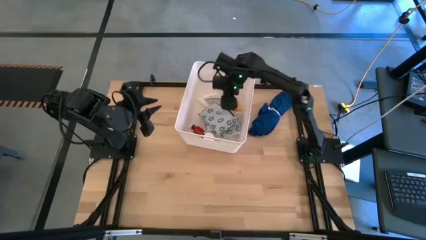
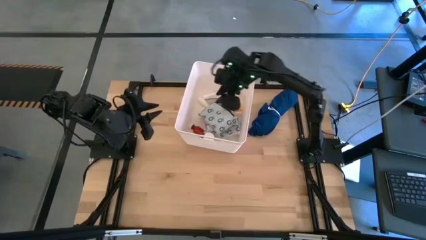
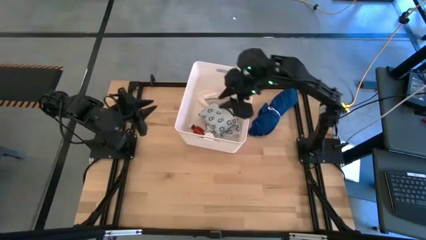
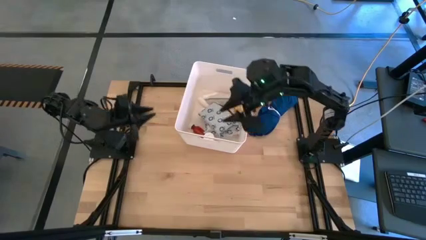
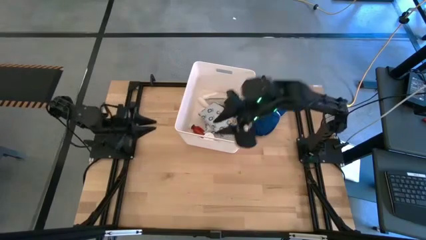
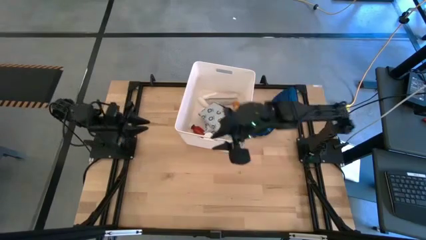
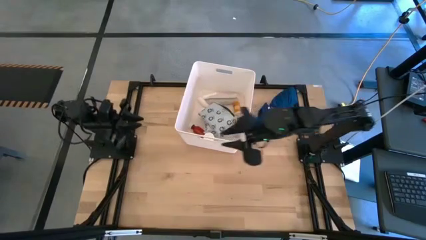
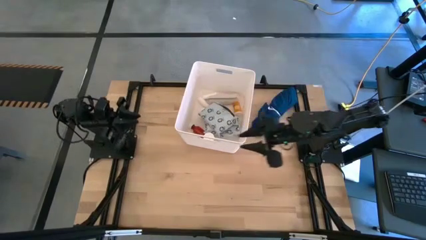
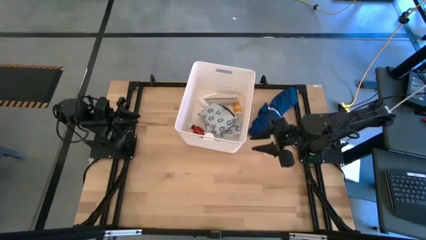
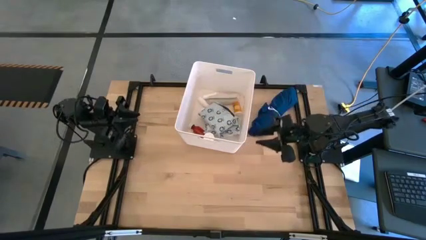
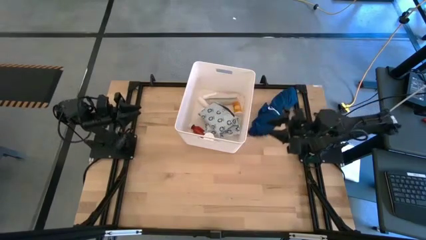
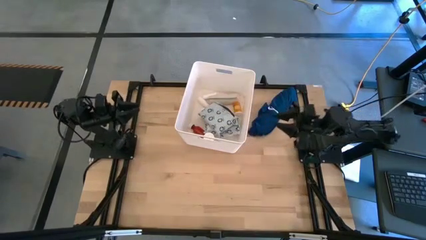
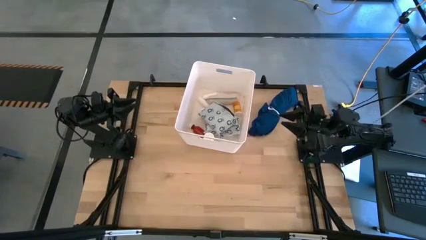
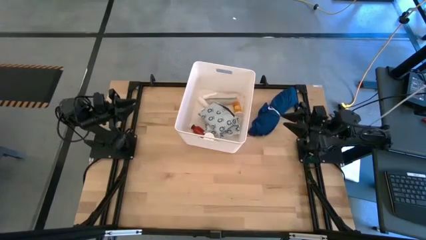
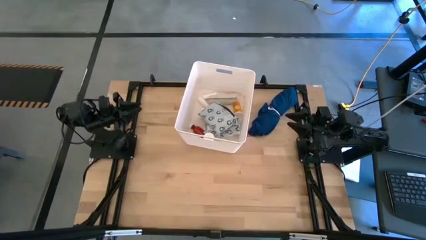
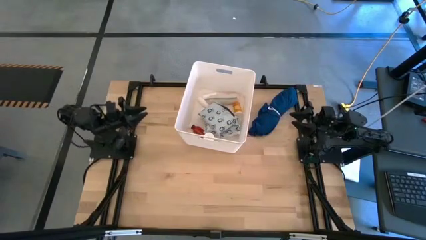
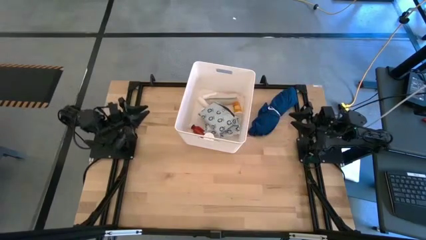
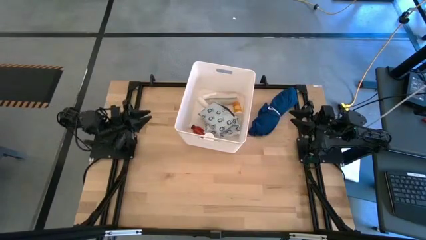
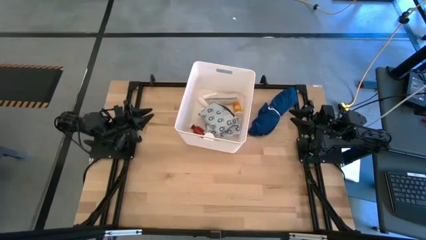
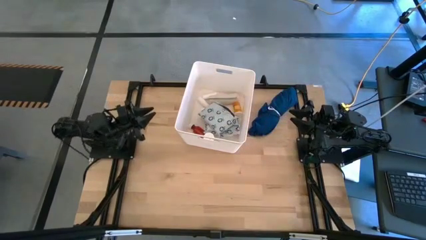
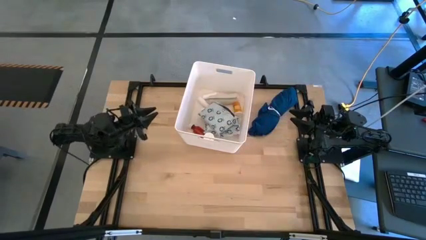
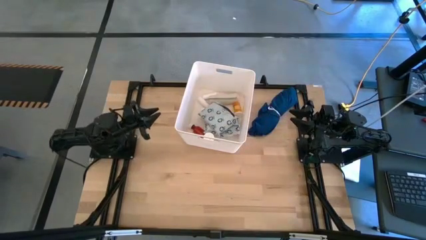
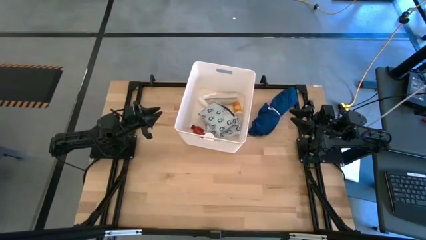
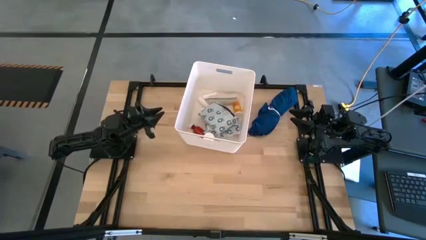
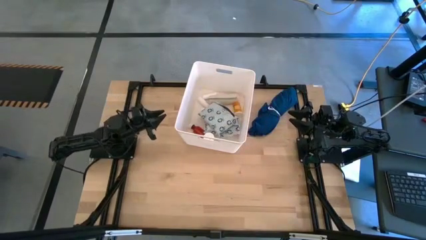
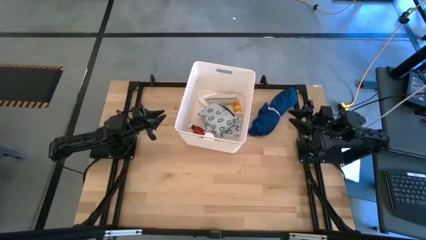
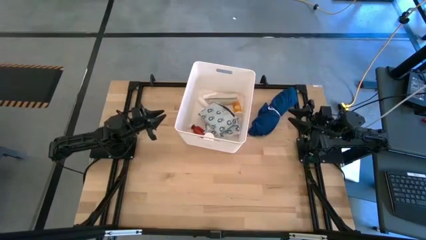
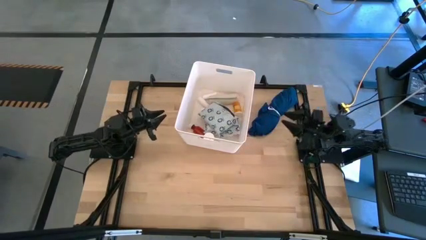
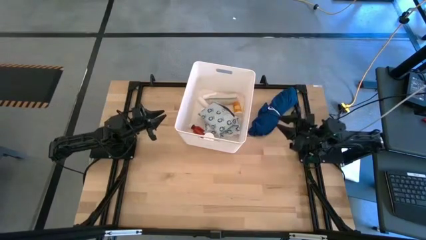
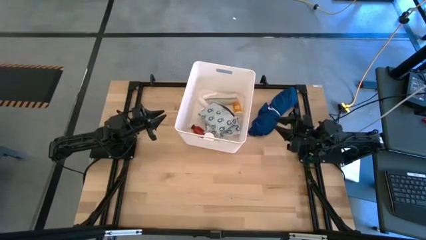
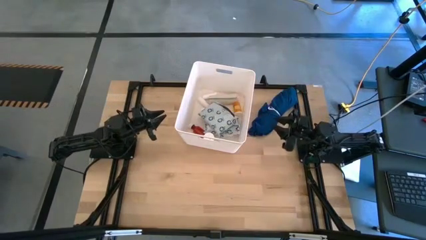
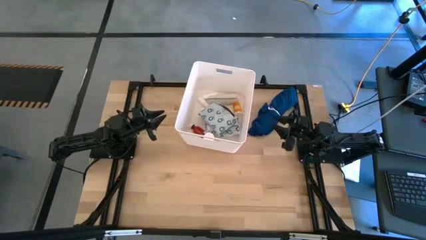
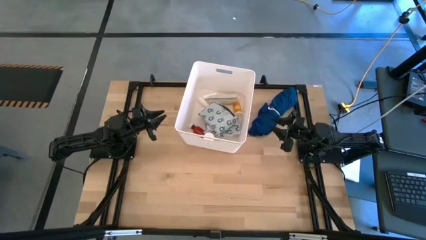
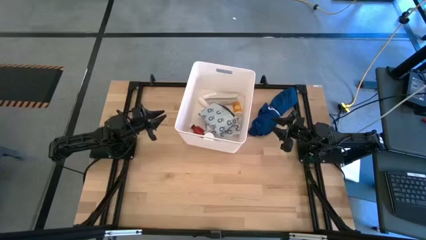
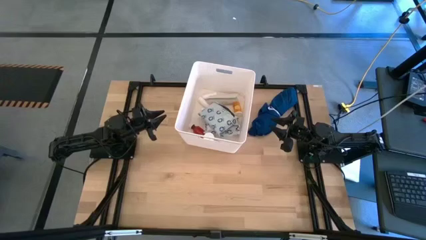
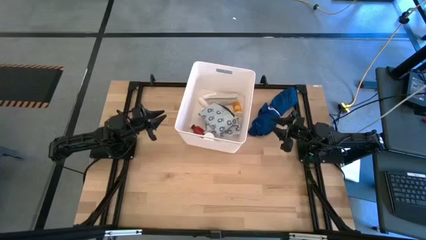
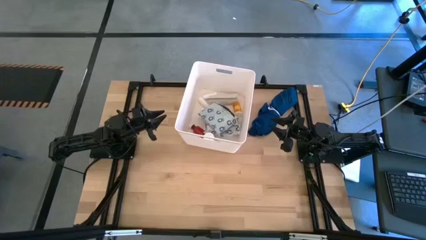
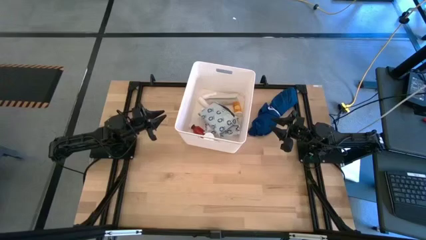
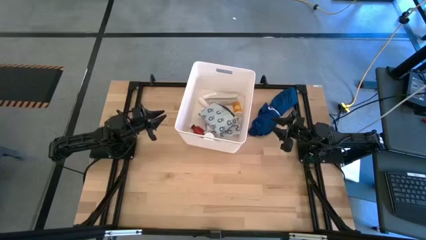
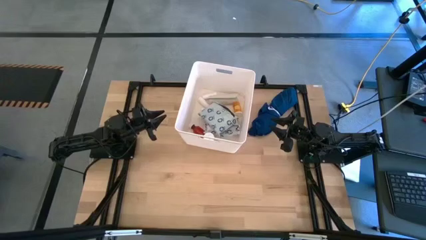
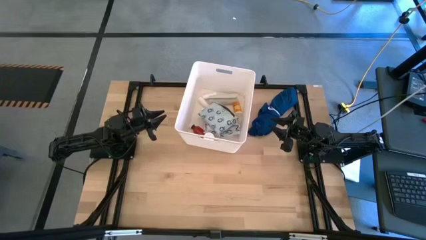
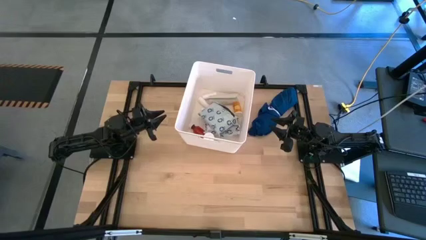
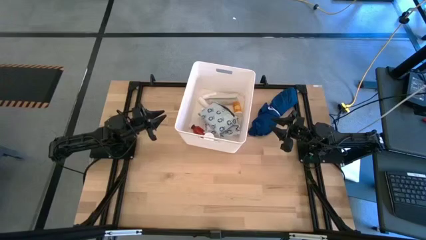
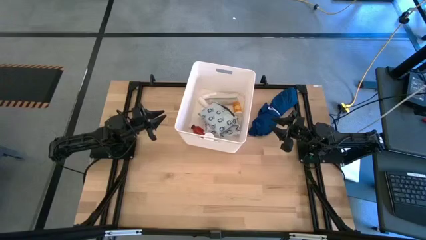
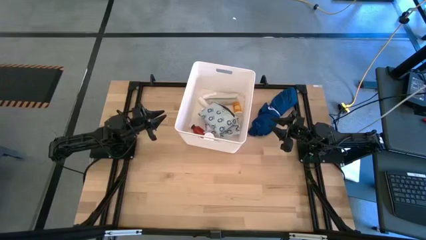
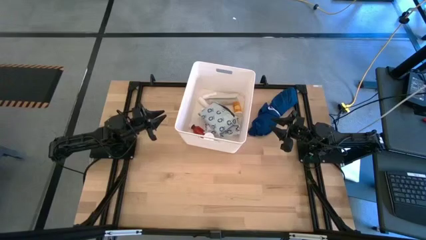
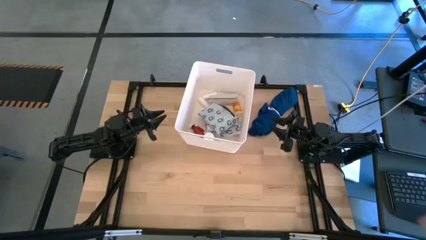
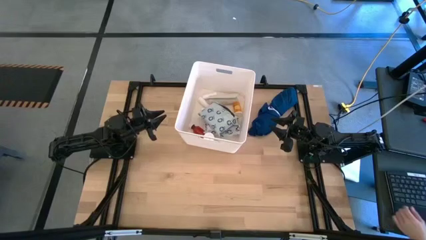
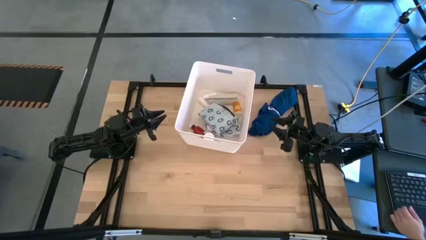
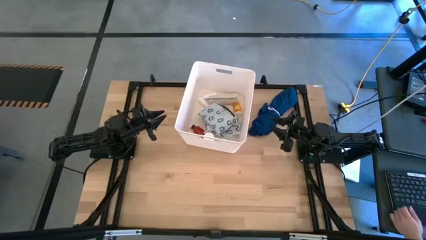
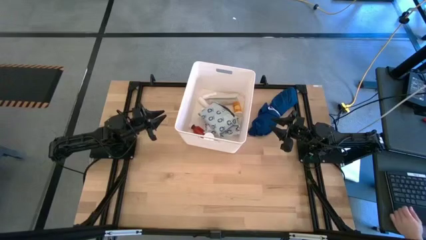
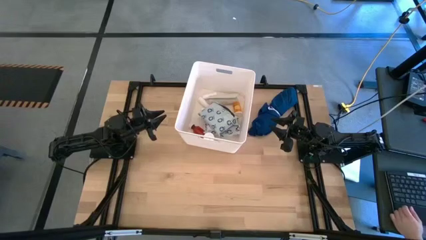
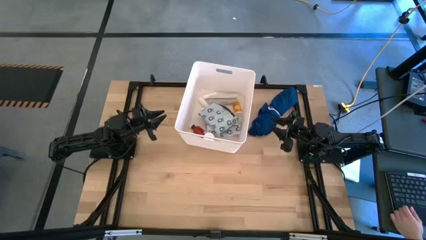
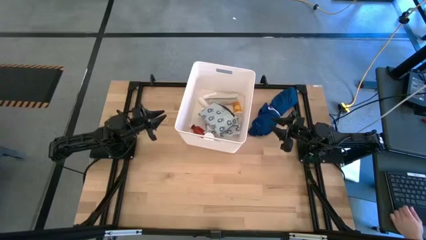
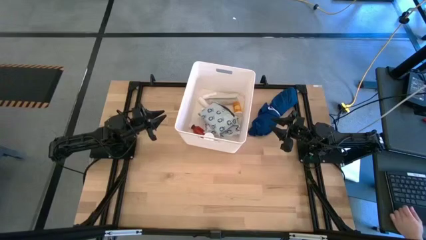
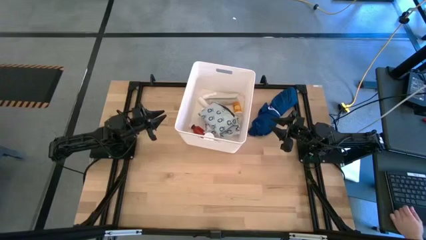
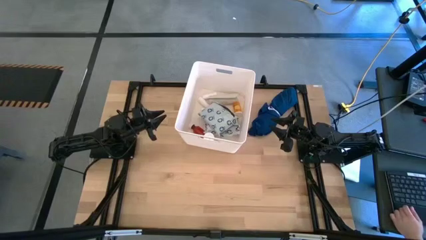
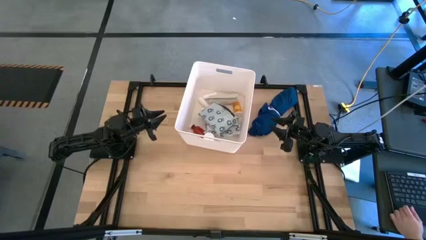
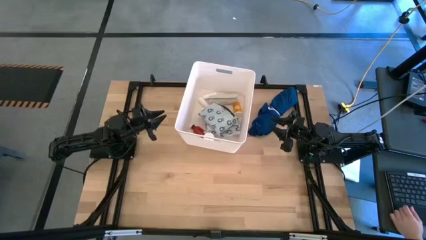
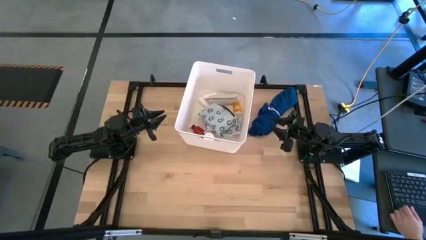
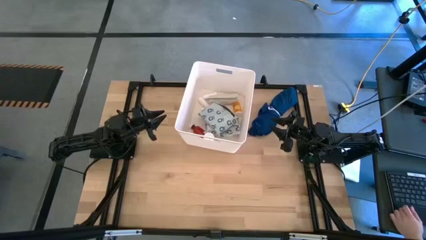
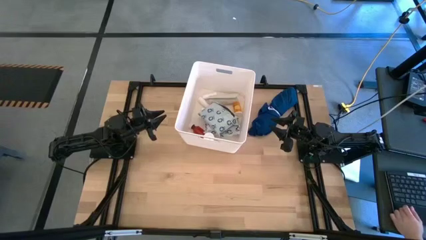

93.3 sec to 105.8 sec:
Task: Pick & place medical supplies in basket/bin
Return to Home Position

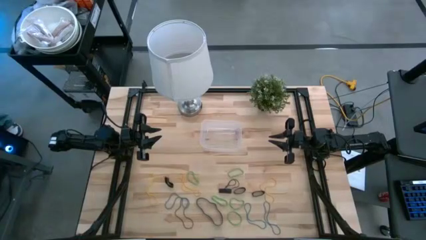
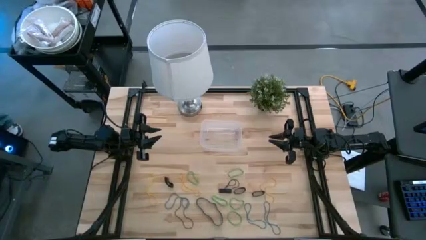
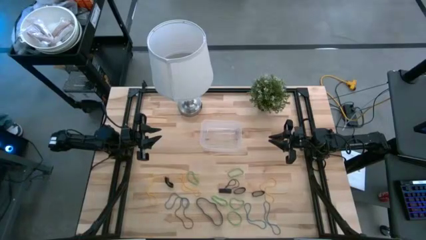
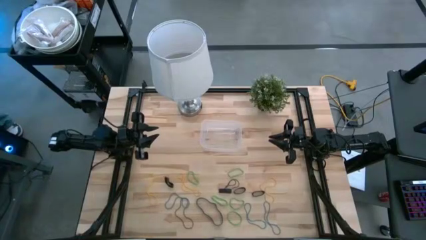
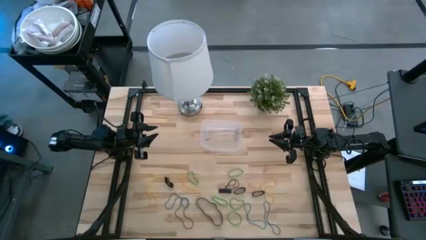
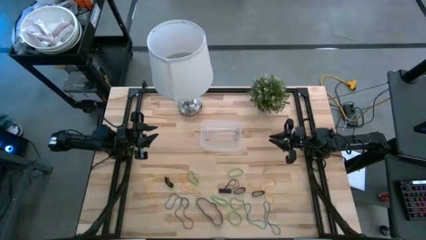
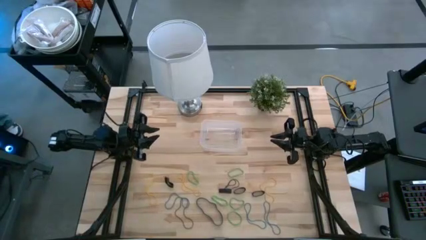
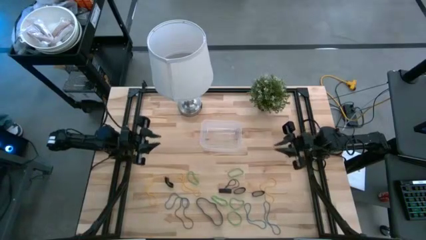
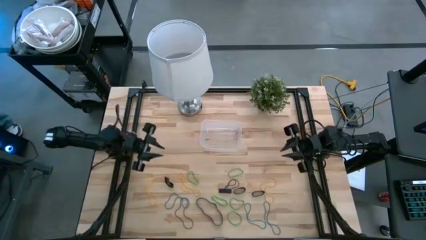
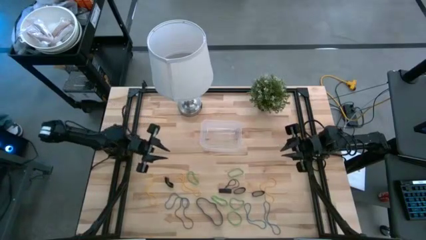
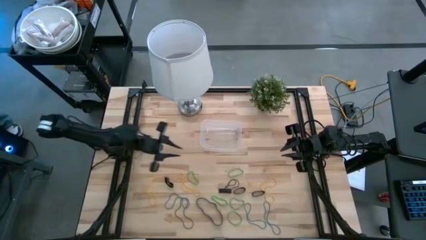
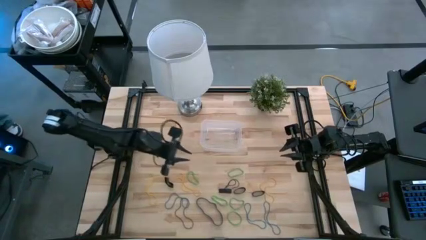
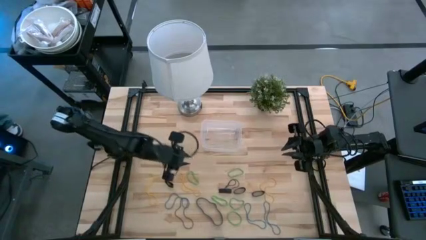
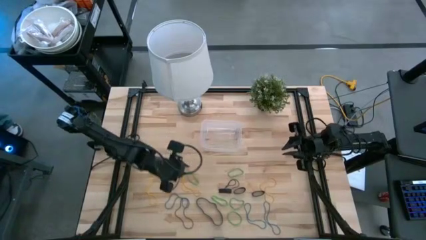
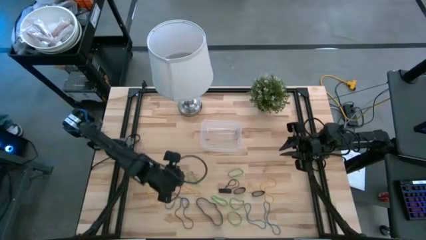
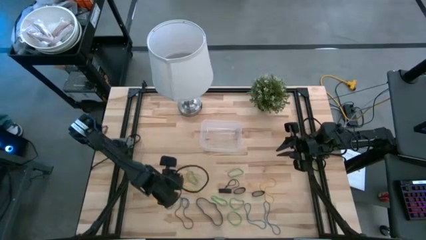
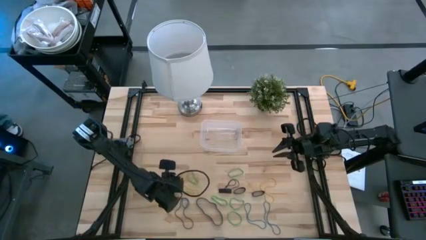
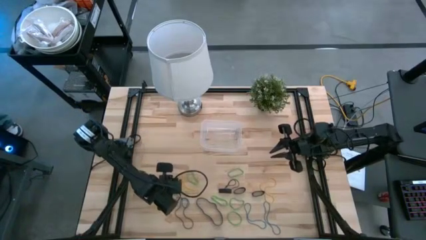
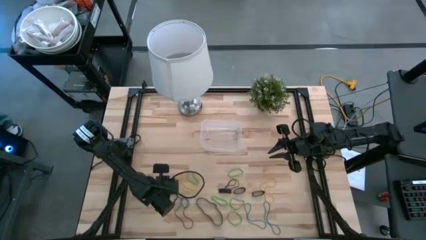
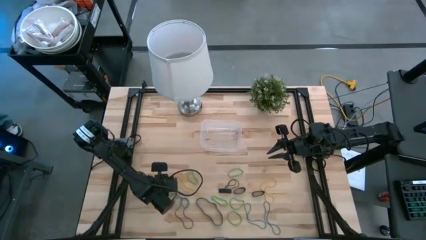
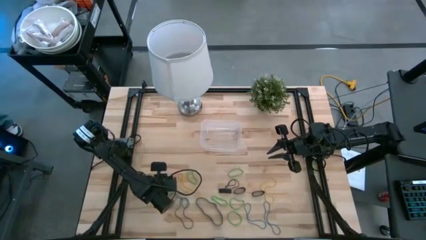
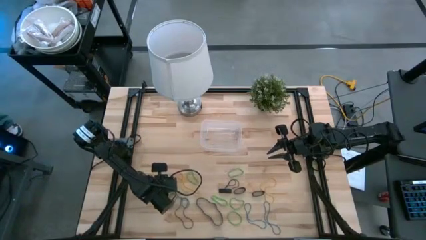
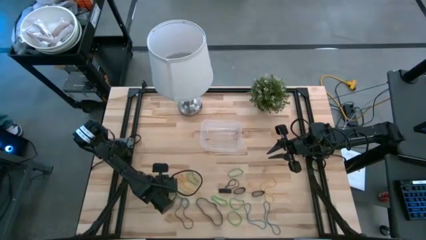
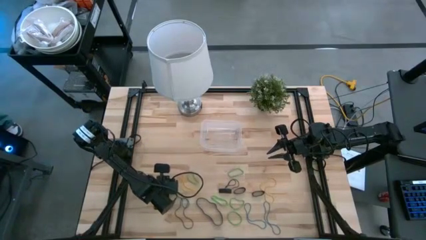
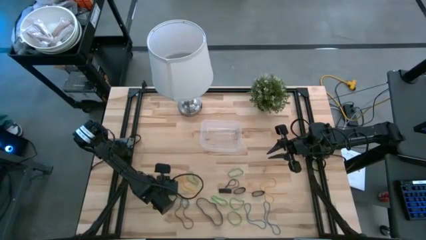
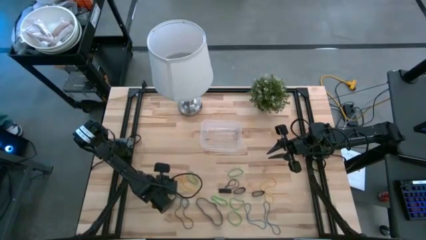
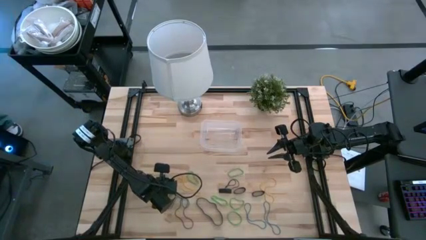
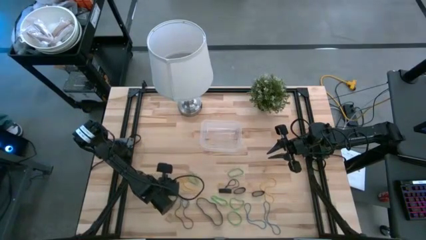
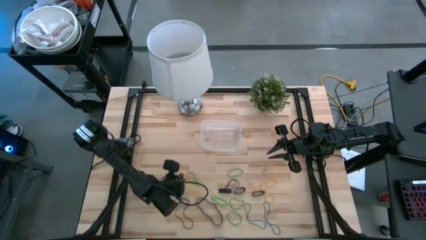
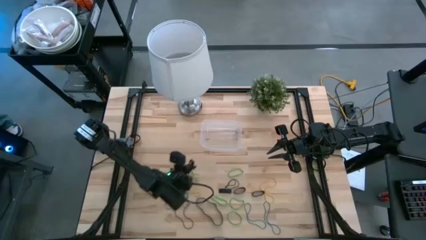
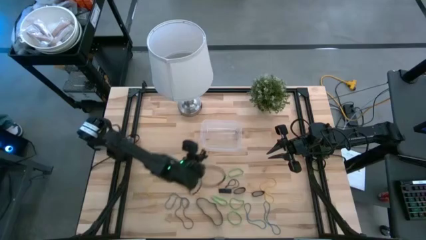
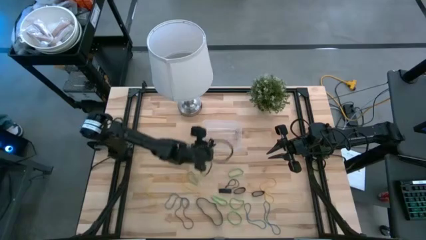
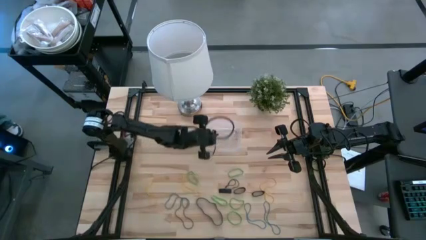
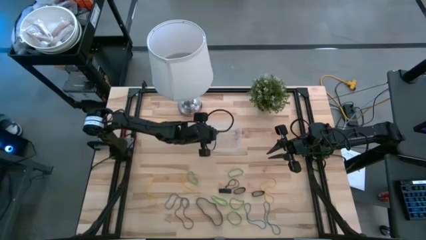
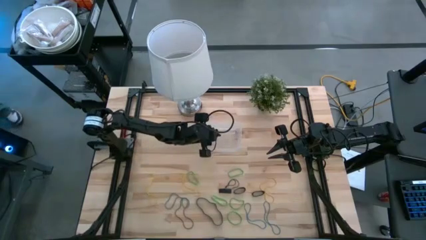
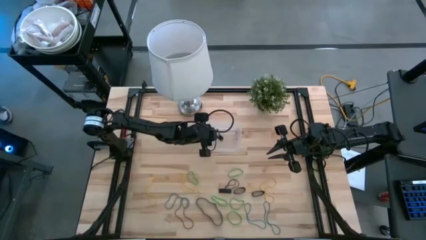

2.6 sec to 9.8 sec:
Task: Pick and place rubber bands into bin
Put the black rubber band into the transparent bin
